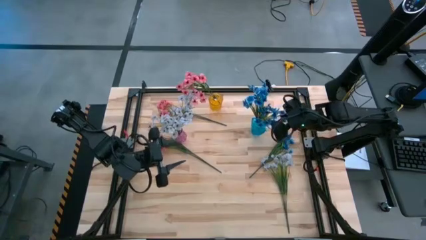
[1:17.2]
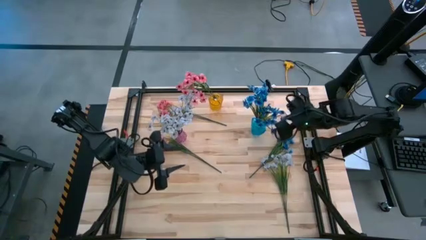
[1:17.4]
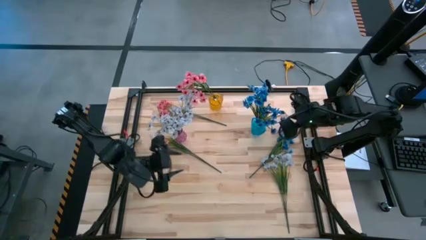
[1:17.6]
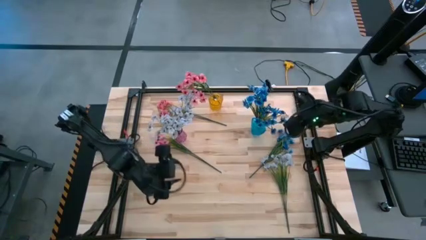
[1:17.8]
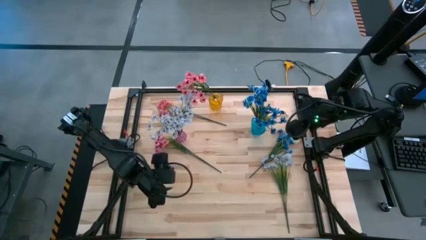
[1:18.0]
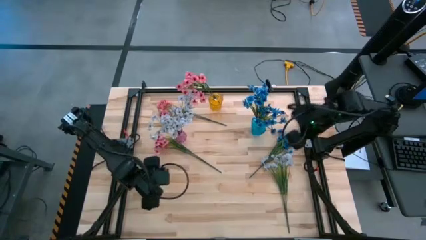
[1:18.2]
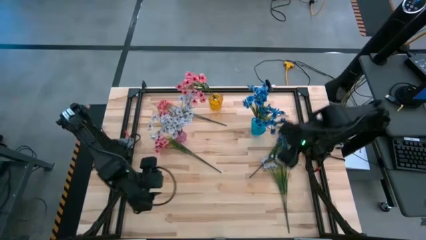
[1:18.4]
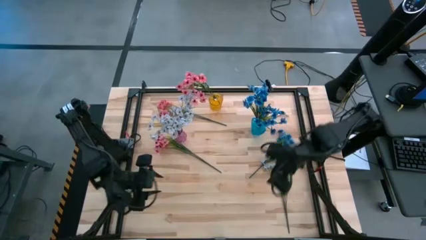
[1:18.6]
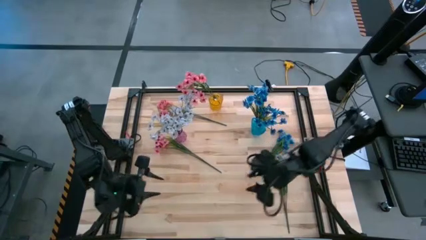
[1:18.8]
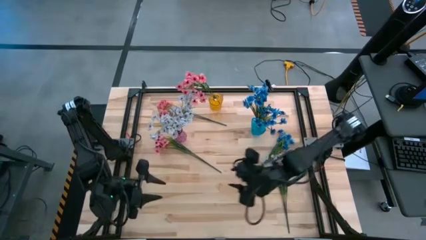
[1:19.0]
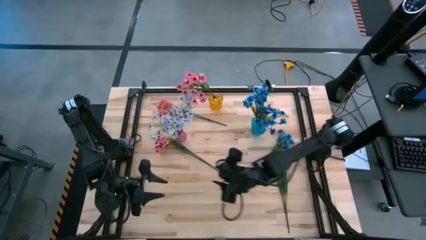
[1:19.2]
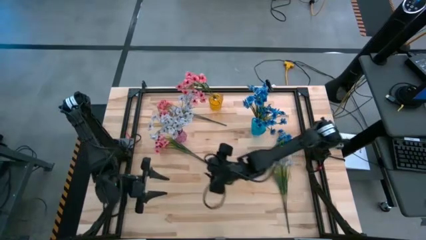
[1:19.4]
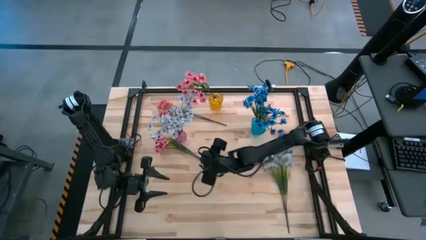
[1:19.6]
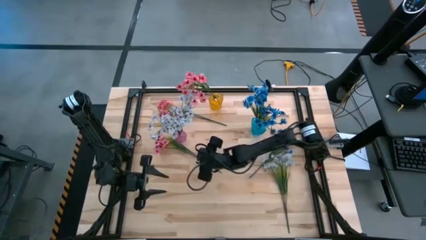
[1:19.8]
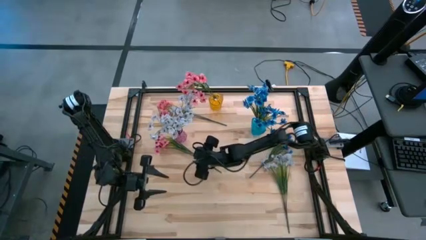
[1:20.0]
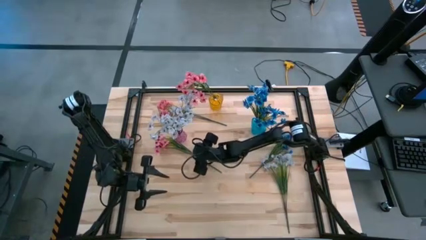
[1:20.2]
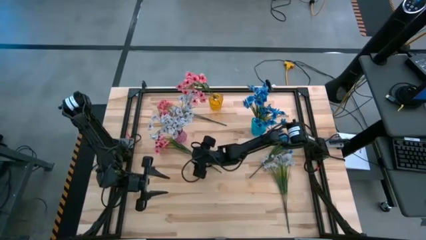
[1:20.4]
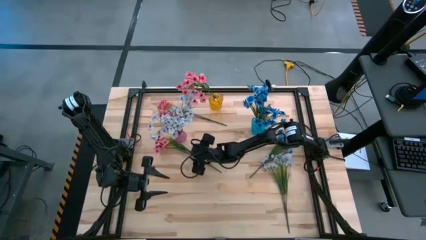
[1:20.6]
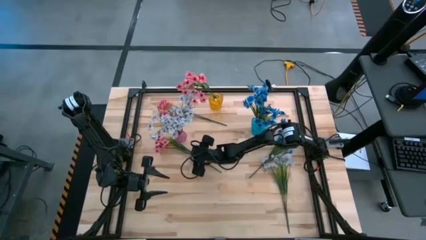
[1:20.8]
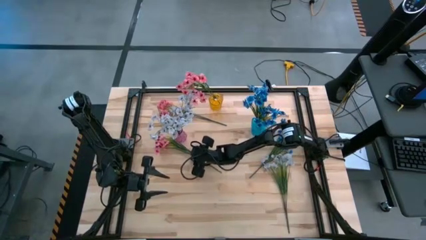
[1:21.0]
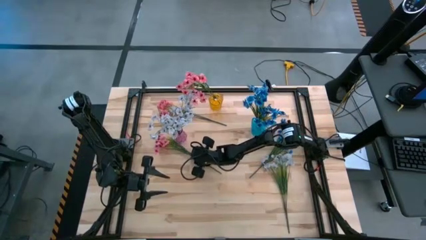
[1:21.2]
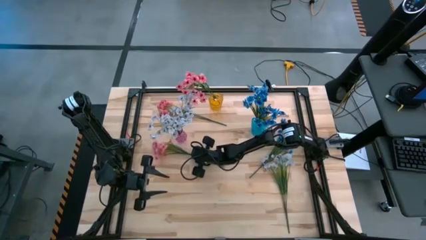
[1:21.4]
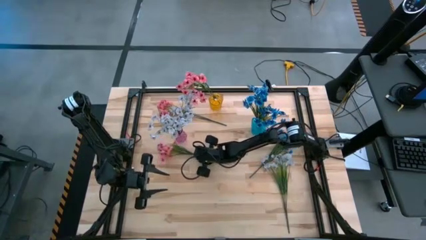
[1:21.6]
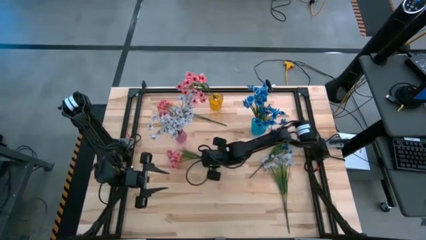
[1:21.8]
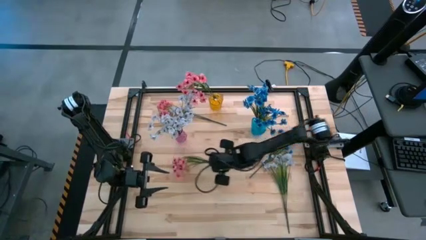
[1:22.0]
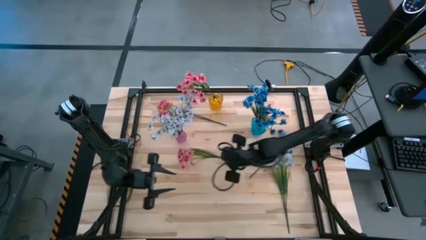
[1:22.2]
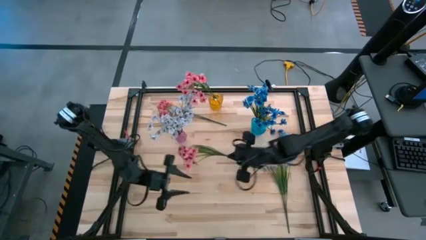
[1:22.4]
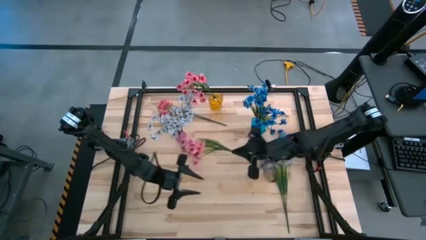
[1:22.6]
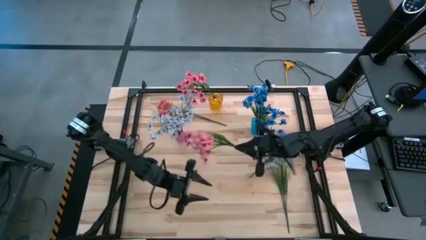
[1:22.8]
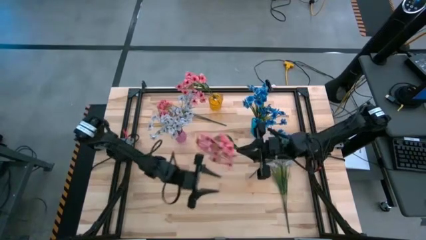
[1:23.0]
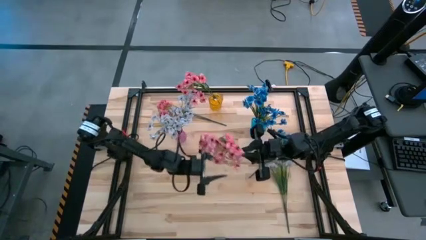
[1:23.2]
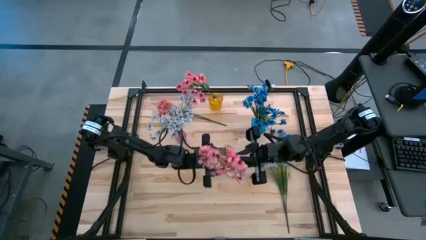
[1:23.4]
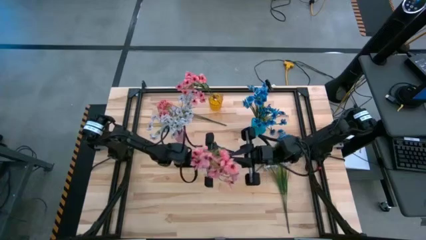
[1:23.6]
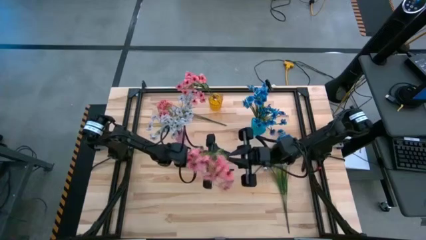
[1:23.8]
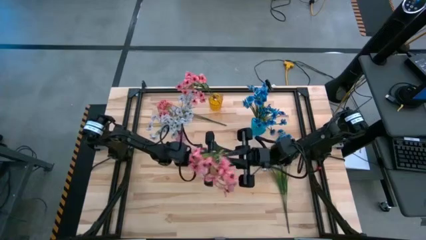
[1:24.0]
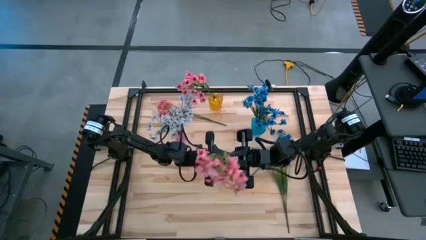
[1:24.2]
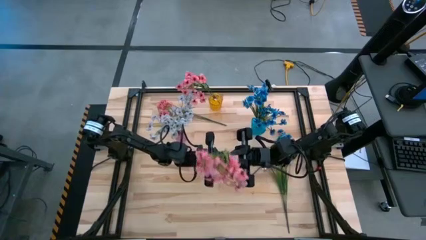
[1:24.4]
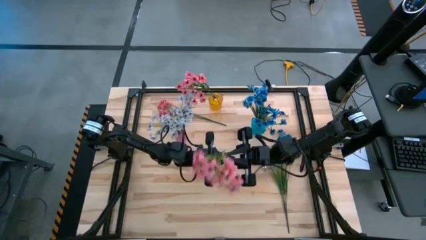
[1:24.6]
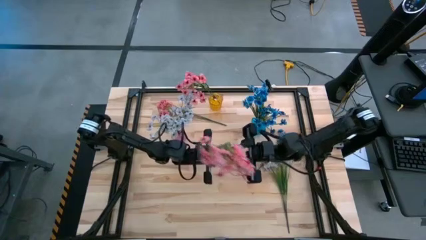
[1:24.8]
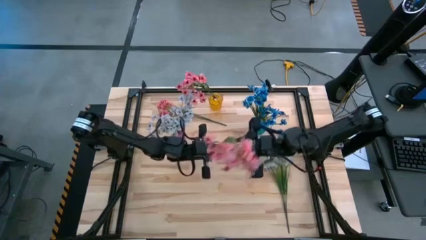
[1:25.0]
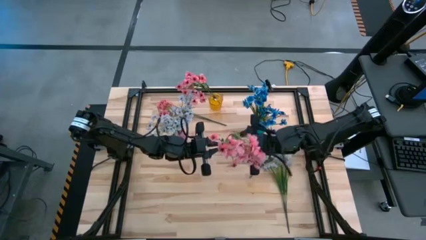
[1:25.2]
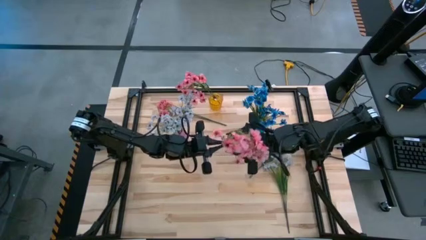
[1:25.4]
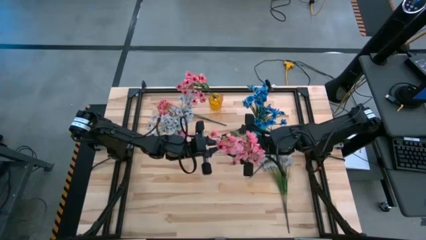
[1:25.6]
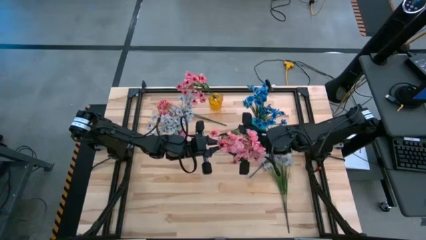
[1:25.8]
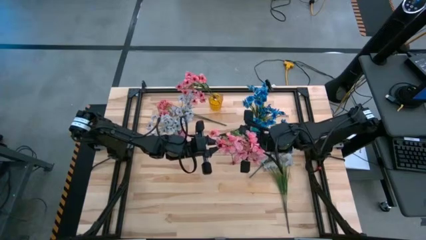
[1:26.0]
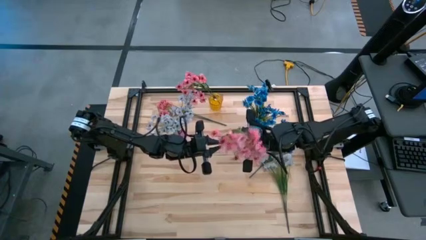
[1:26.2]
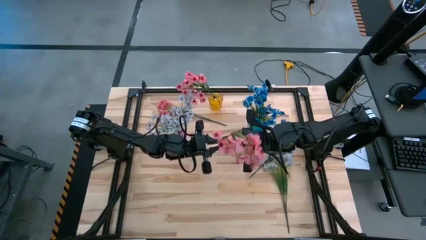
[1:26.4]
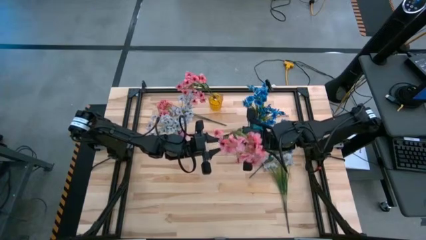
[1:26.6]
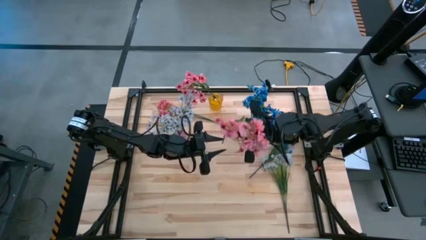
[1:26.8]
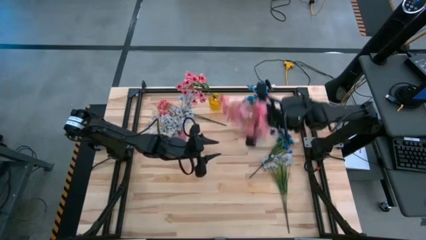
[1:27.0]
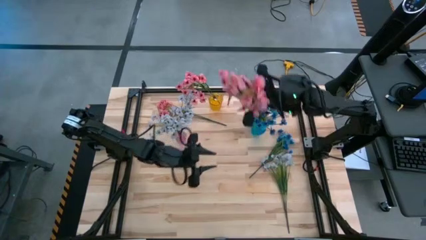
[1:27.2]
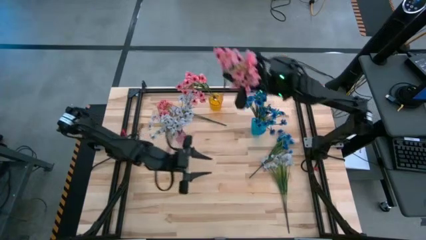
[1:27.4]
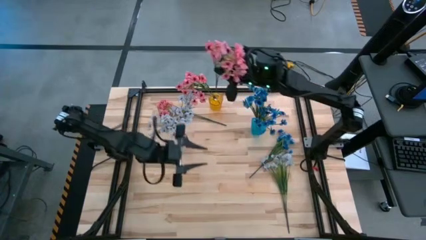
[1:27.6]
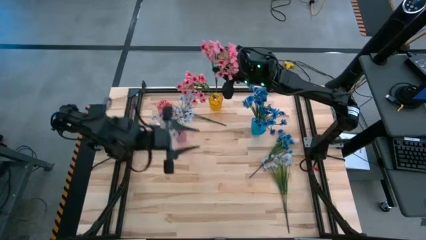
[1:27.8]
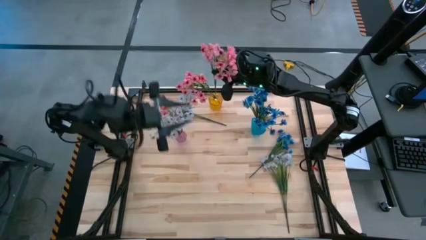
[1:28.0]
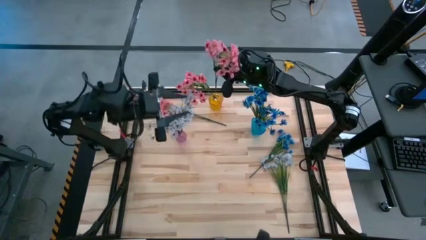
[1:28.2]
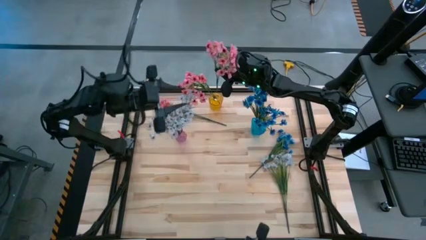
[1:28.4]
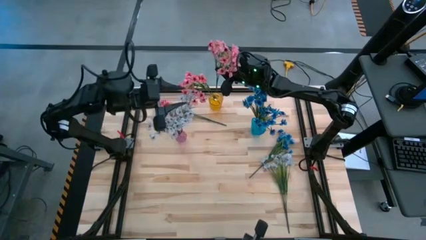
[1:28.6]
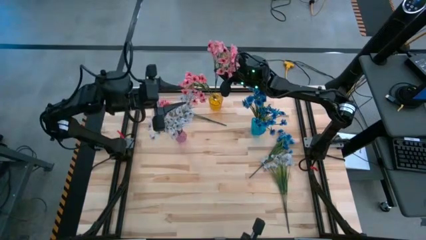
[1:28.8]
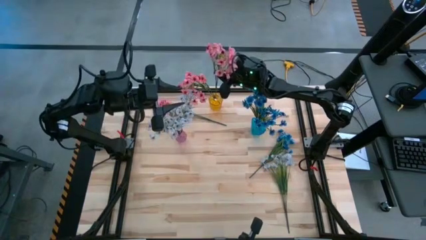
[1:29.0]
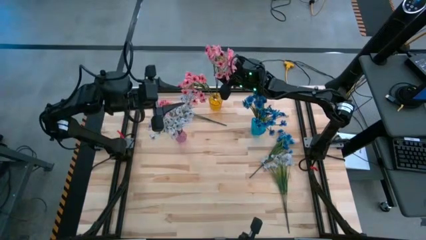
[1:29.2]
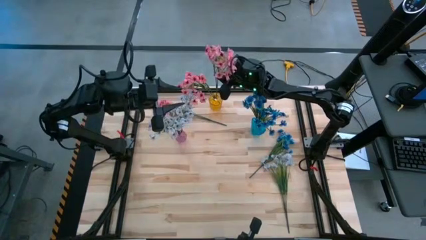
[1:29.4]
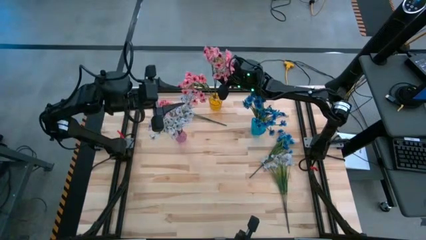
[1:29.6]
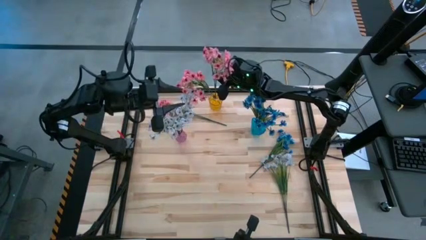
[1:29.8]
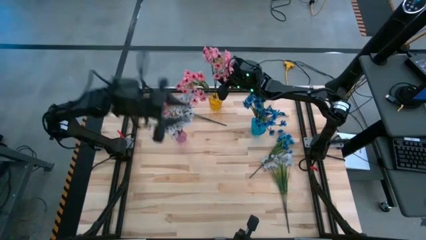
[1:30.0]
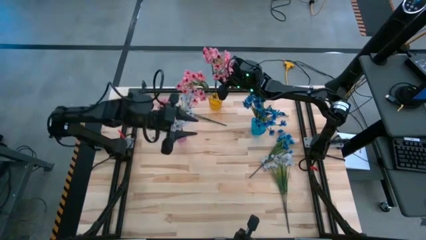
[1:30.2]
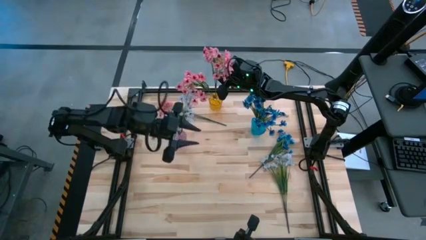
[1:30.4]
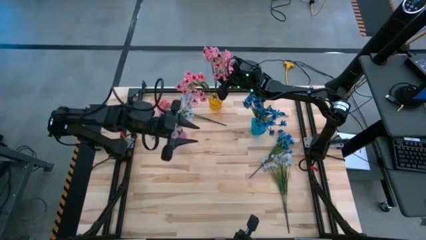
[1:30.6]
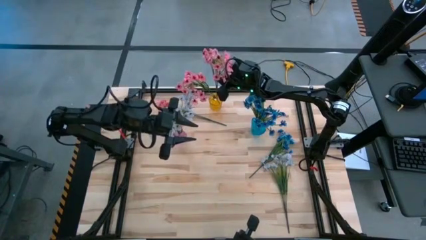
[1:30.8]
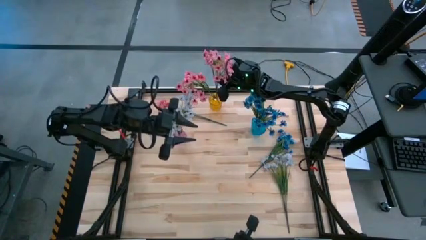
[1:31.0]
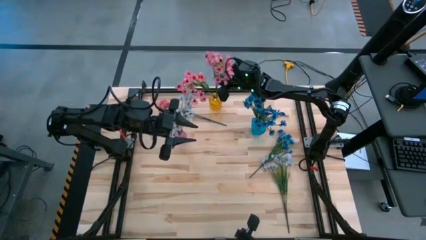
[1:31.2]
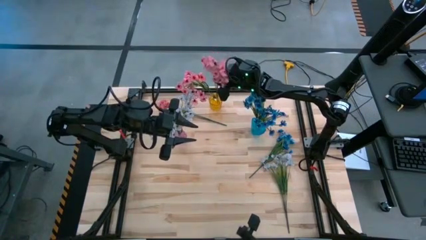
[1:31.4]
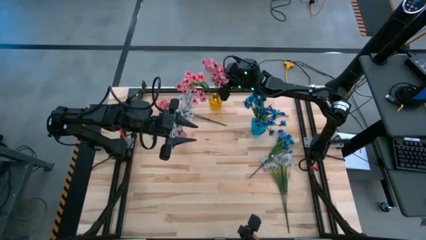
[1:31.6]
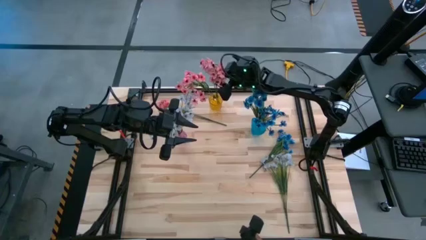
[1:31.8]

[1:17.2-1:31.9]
Task: Sort flowers into vase by color
Put the bottom pink flowers into the yellow vase
